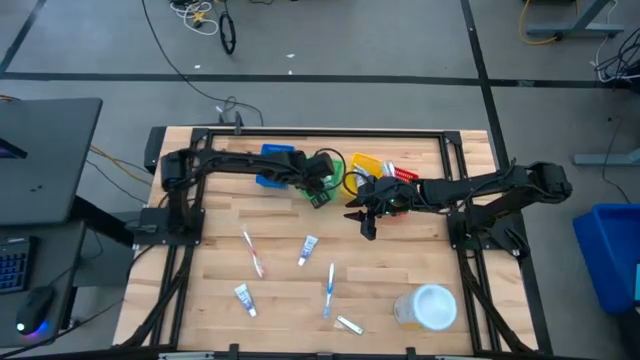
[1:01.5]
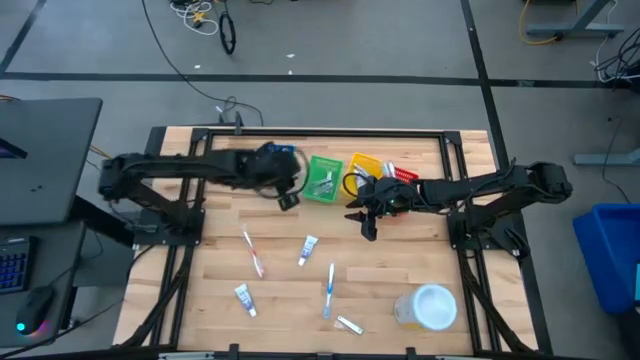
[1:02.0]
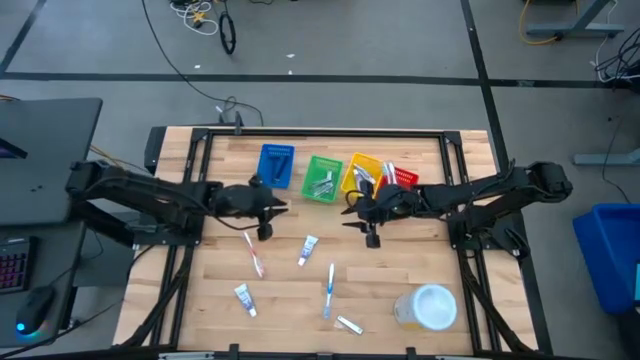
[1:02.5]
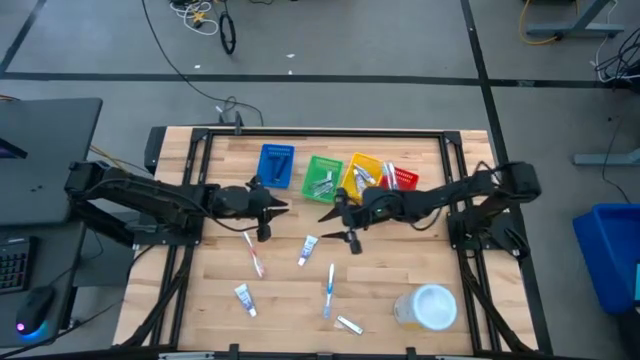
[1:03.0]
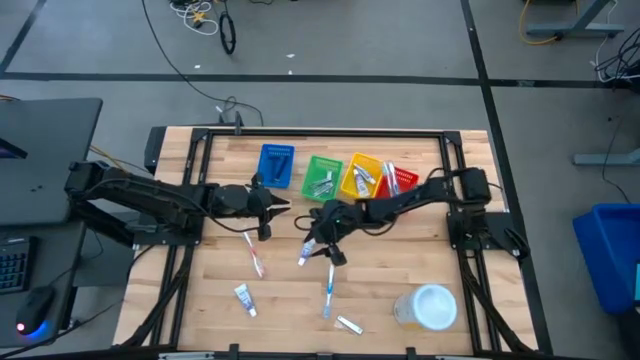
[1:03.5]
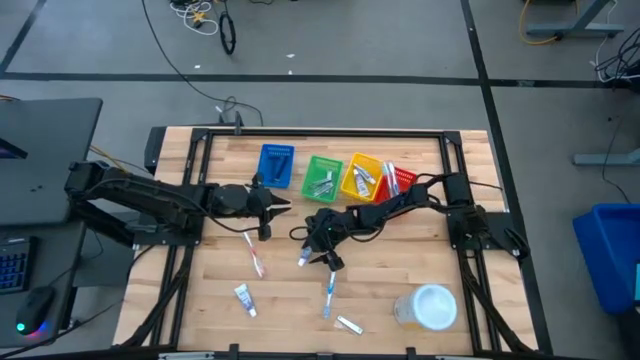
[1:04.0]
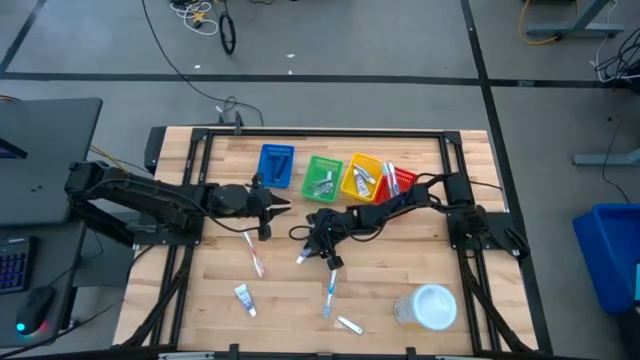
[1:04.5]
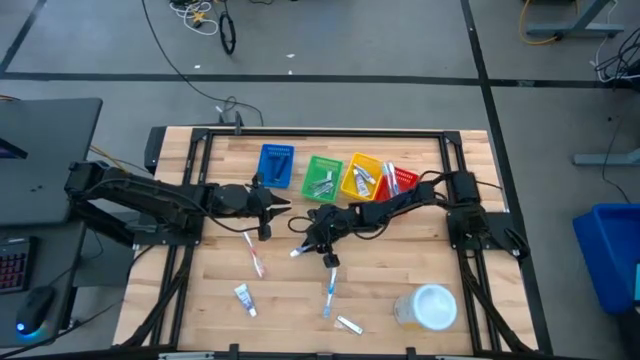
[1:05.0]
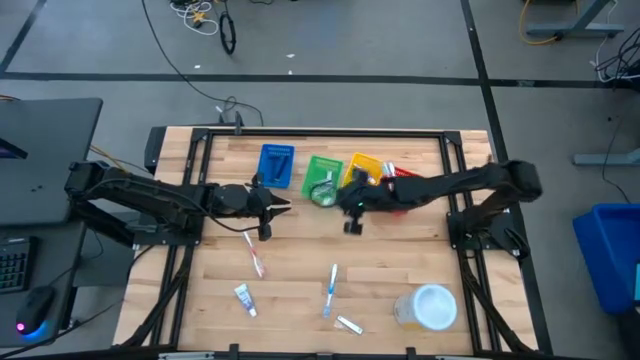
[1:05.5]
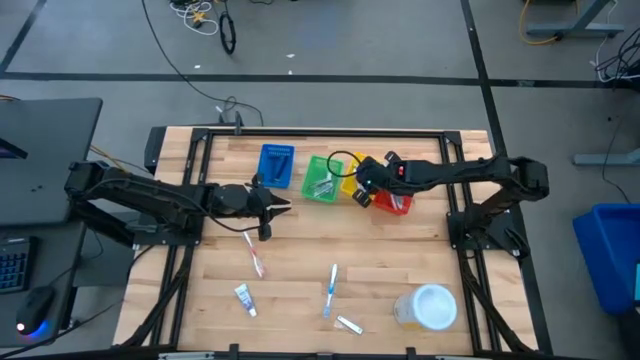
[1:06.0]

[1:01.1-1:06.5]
Task: Pick & Place Travel size toiletries
Put the right white toothpaste into the yellow bin

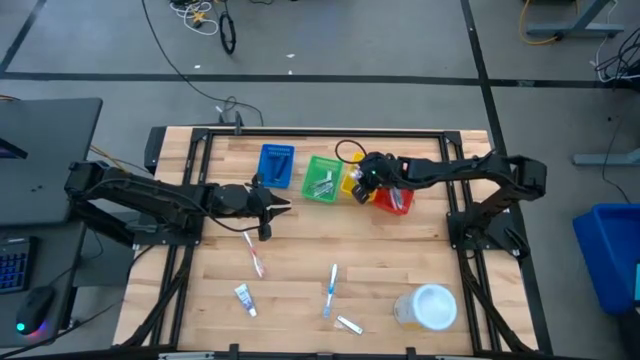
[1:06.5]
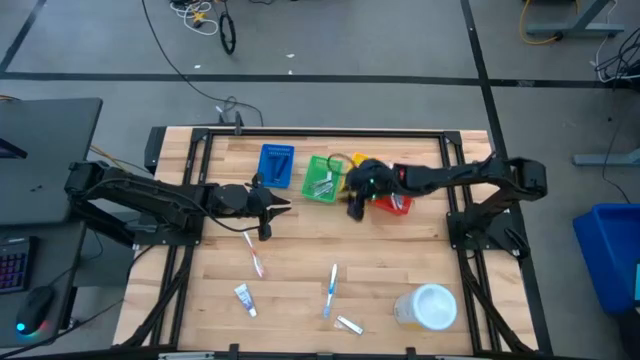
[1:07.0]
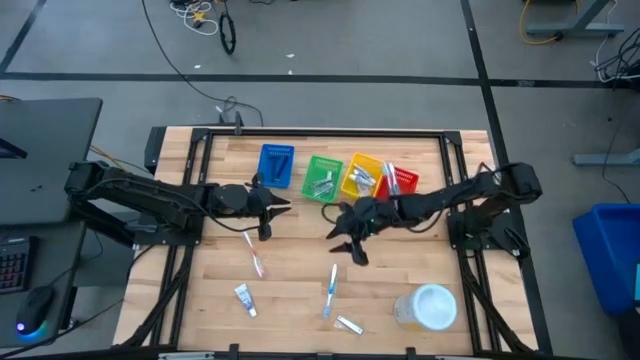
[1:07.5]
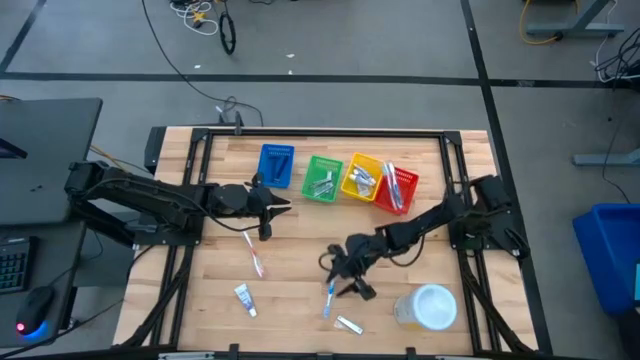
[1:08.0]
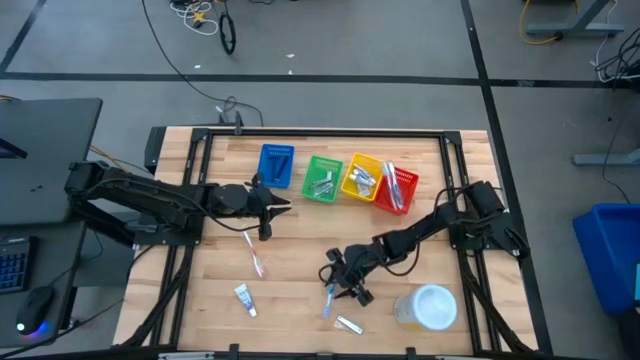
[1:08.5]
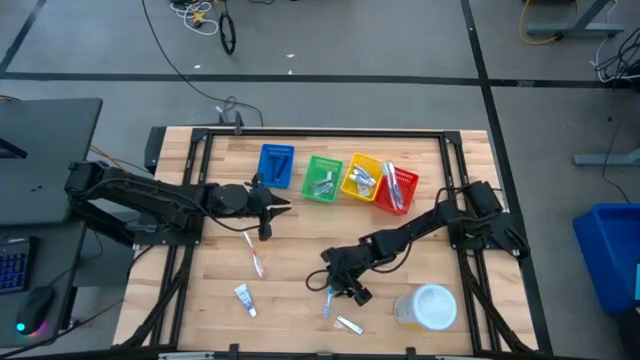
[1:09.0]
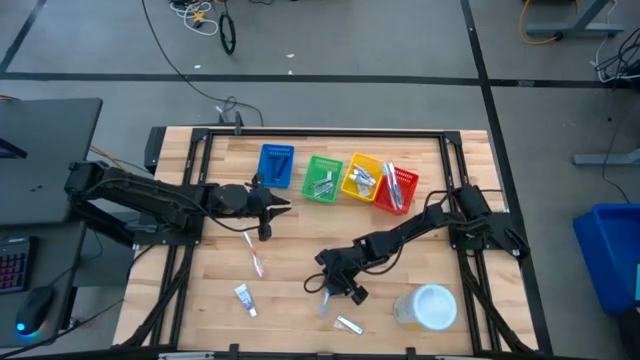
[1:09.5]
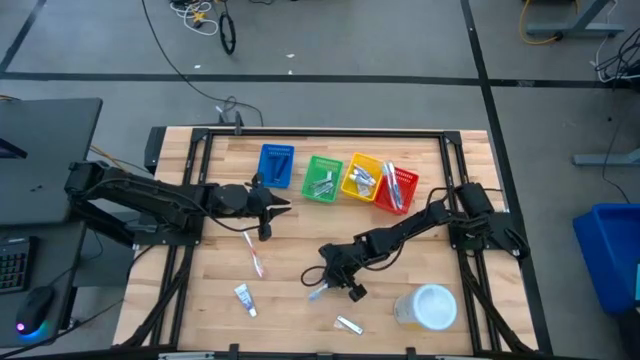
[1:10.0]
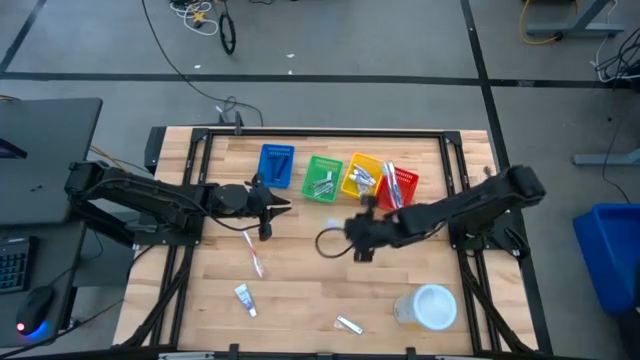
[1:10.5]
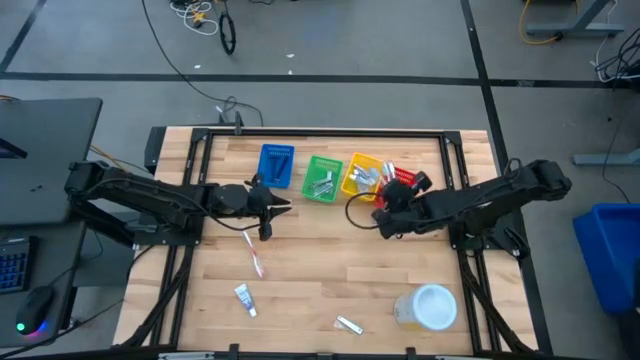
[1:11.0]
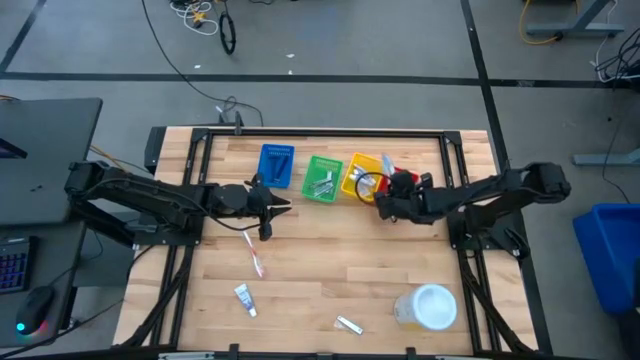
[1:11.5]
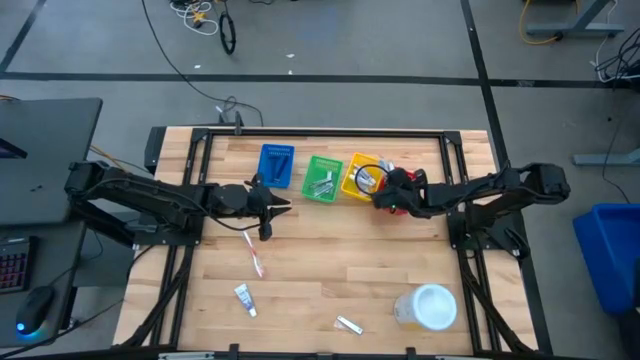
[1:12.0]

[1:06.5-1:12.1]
Put the blue toothbrush into the red bin

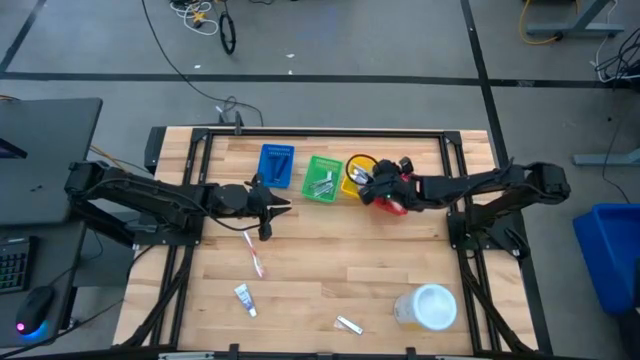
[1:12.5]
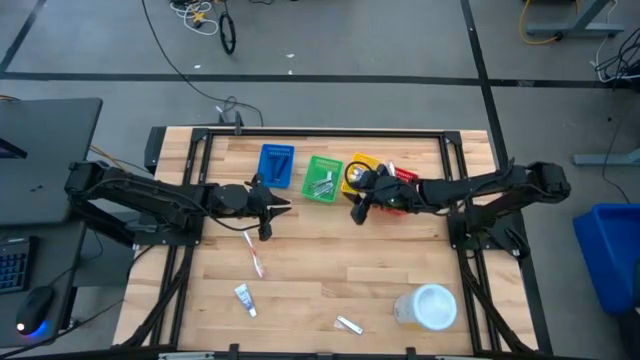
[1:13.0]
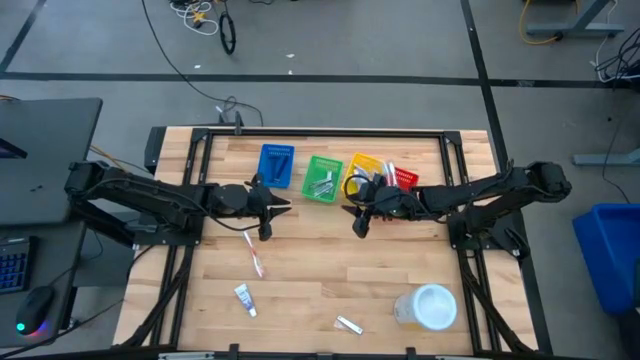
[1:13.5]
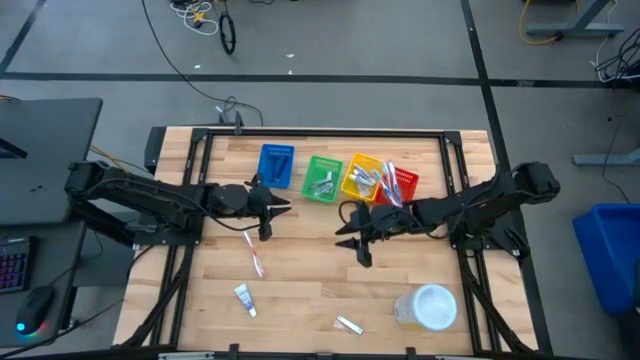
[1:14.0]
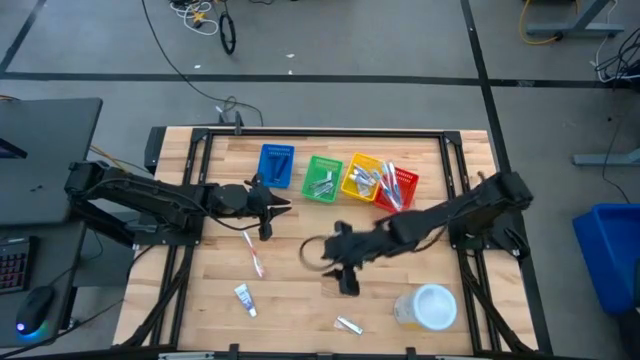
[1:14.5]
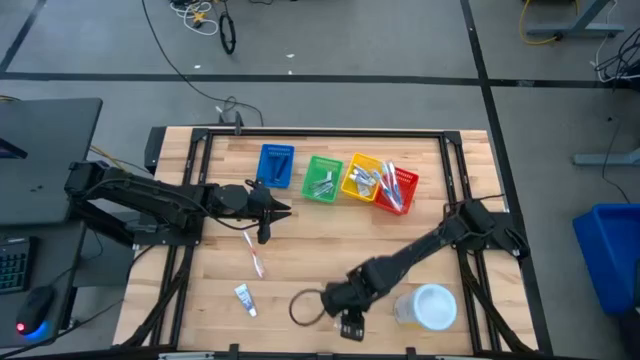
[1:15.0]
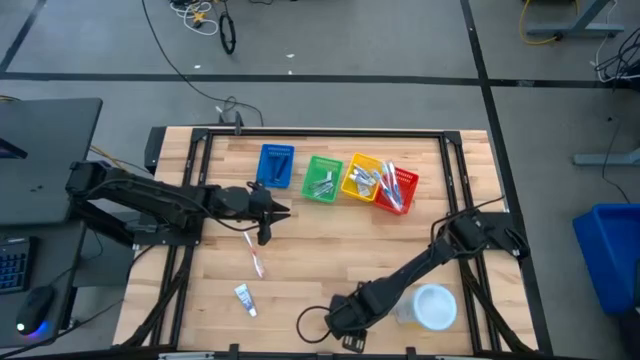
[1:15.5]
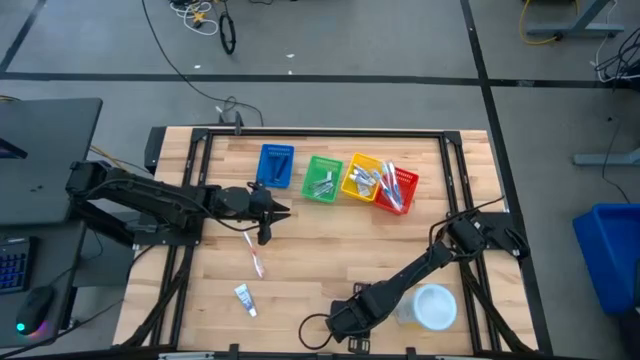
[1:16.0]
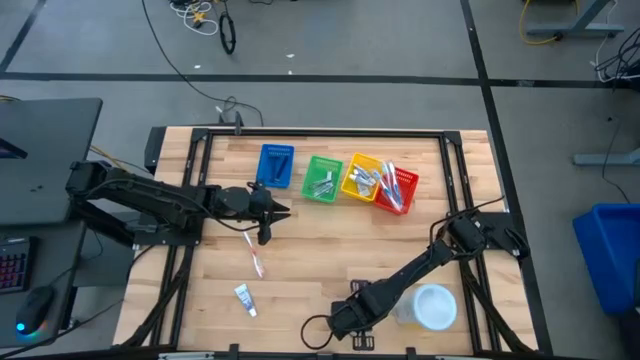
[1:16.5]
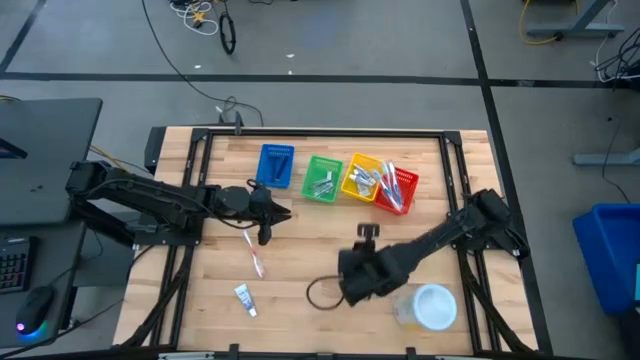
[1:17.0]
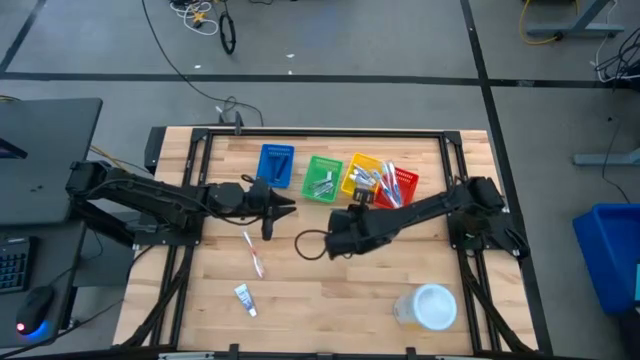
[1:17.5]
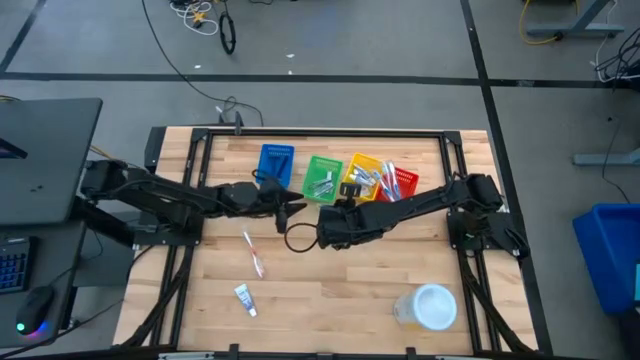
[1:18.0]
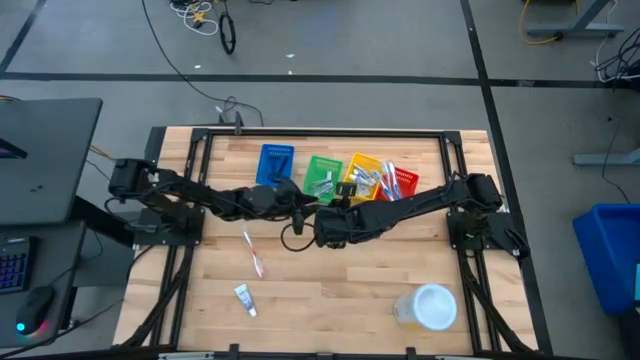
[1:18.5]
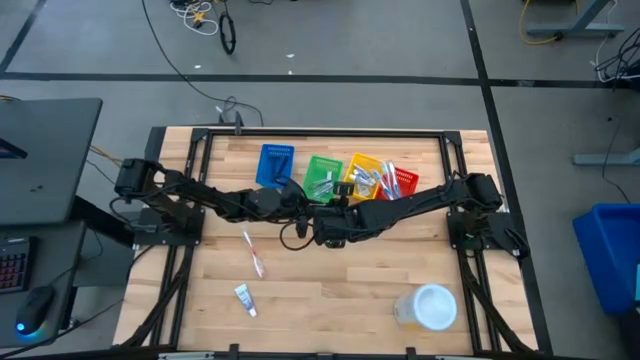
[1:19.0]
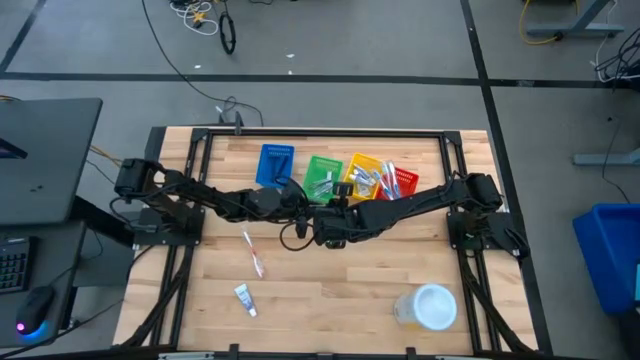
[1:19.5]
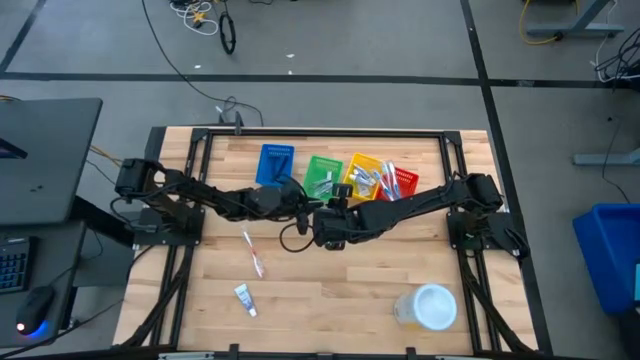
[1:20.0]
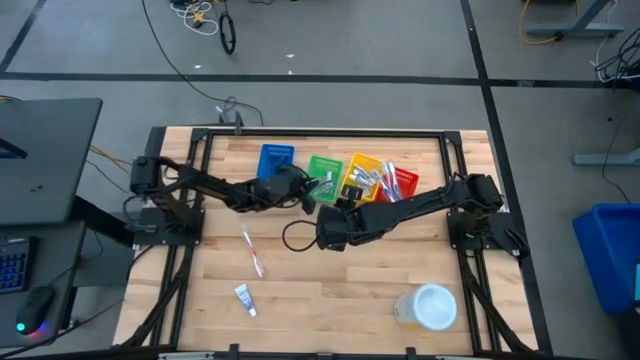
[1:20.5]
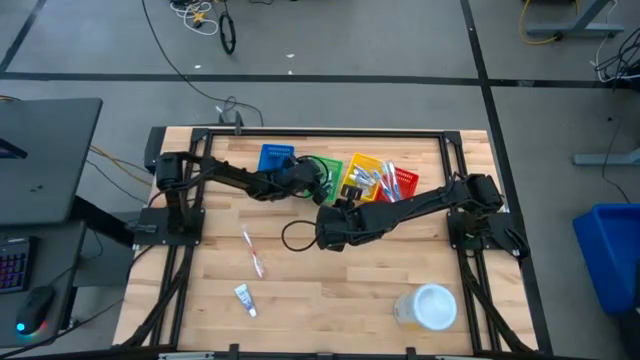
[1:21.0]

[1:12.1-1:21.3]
Put the silver nail cutter into the green bin

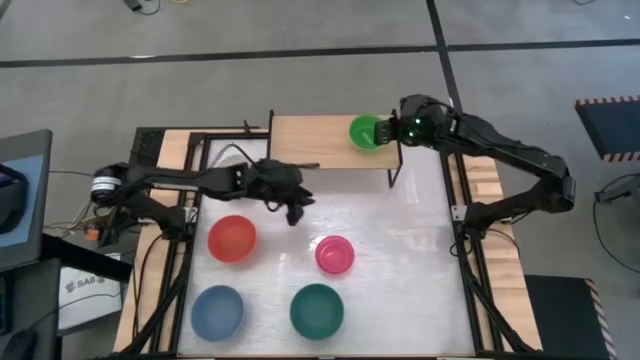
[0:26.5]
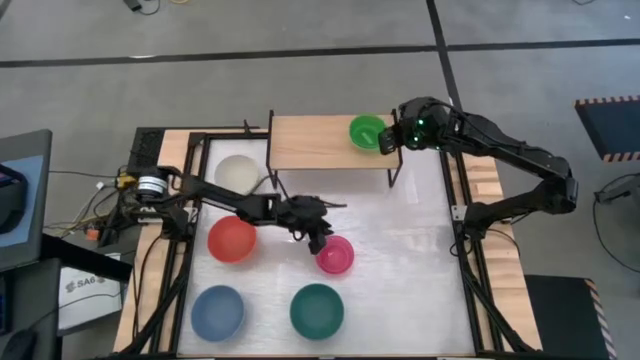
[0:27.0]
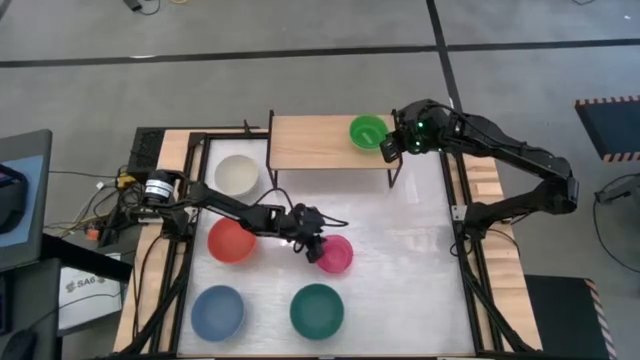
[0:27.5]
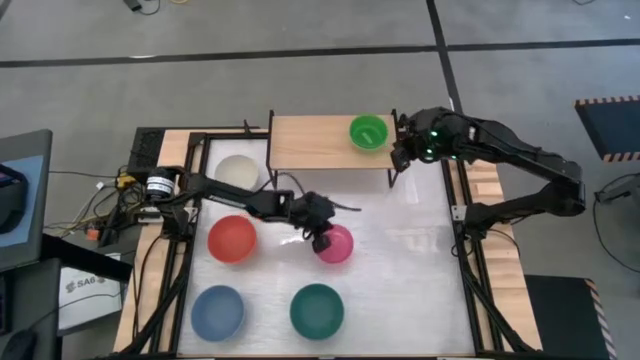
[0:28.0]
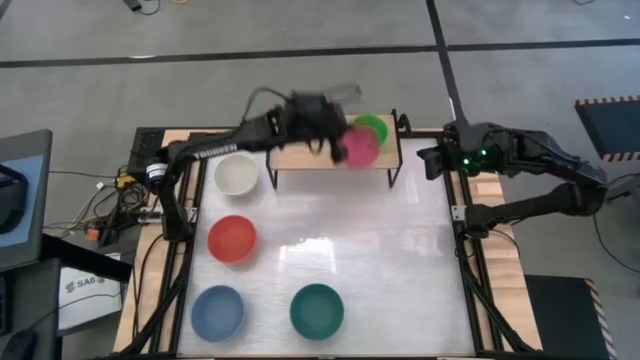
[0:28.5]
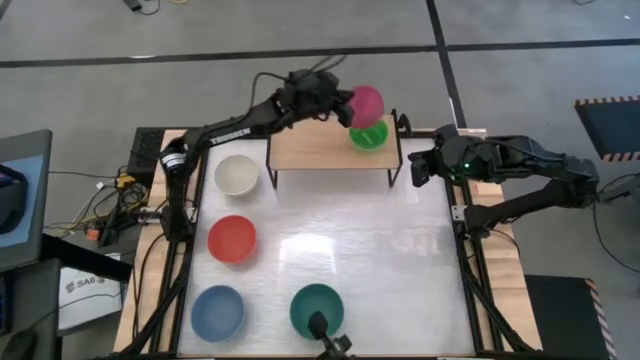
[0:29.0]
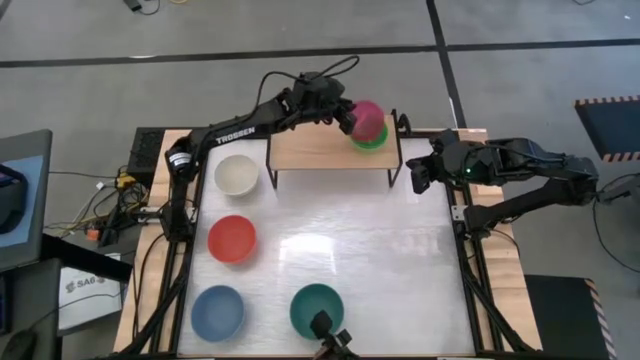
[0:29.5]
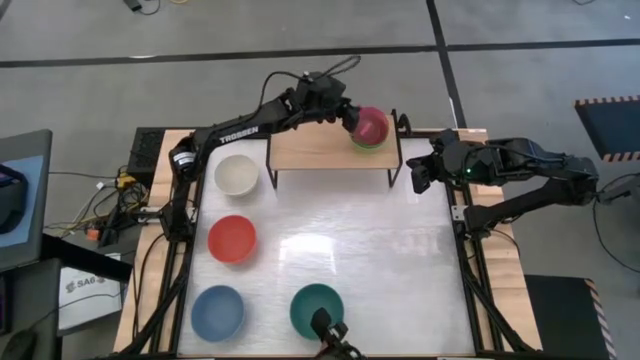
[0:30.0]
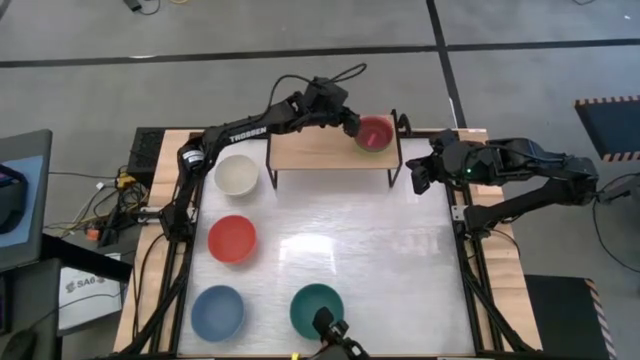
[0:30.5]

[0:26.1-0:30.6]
Task: Place and stack bowls onto a shelf
Stack the pink bowl on top of the green bowl on the shelf
